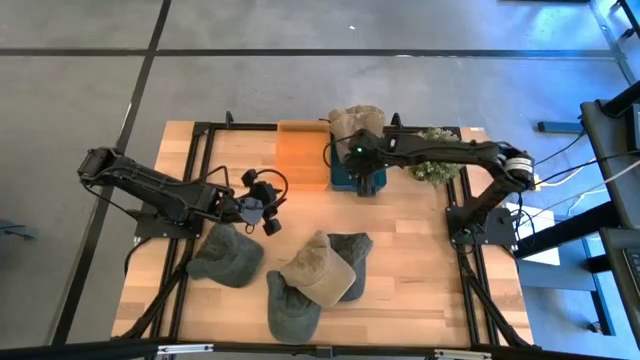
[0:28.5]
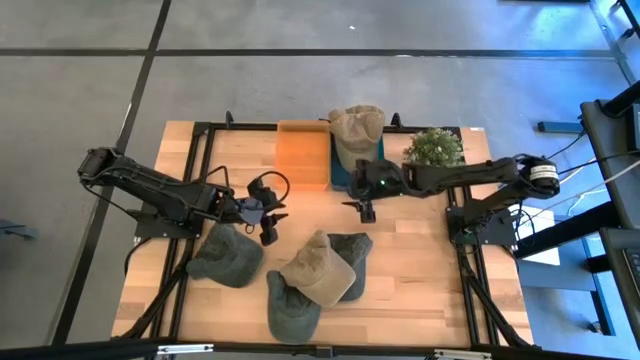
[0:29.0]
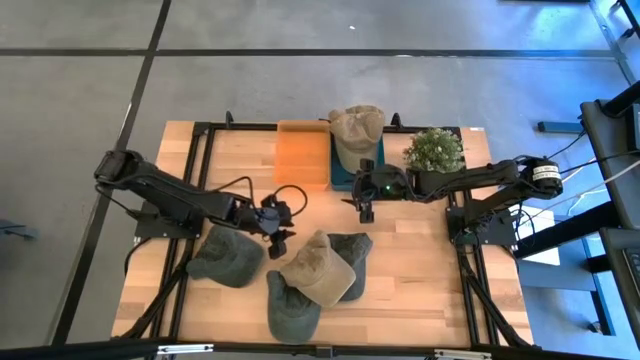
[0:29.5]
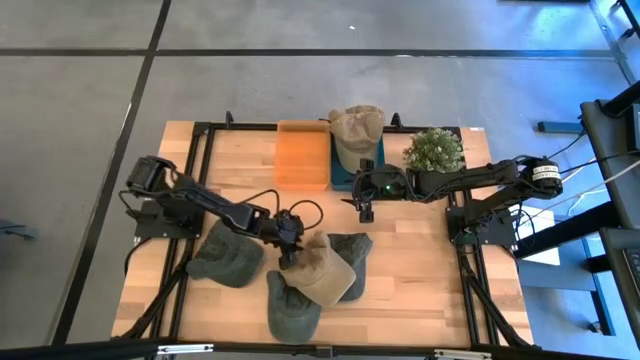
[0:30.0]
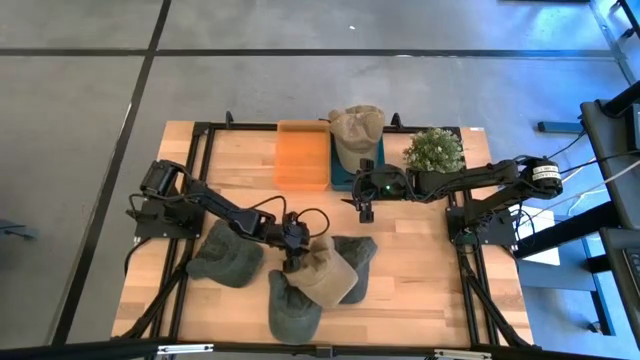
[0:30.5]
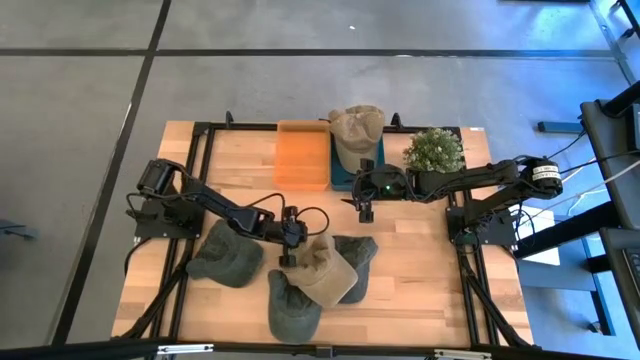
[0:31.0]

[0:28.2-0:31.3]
Task: Pick & Place hat
Put the brown cap into the right transparent bin

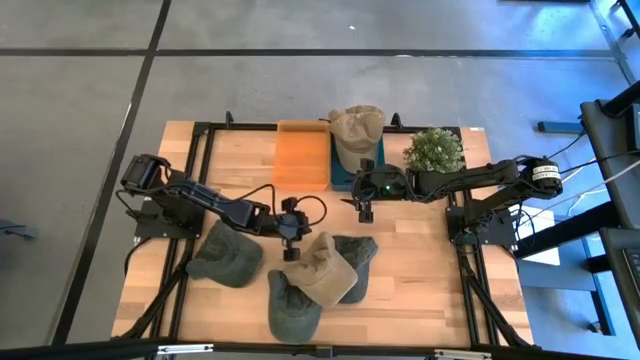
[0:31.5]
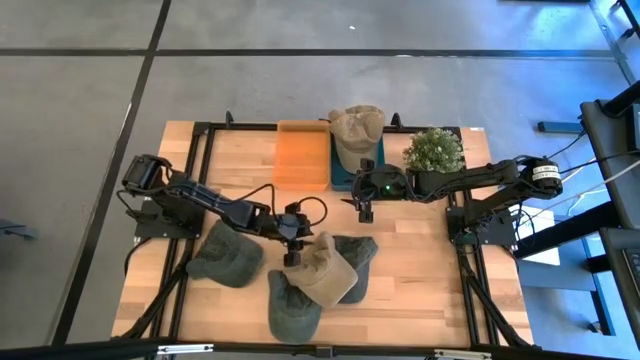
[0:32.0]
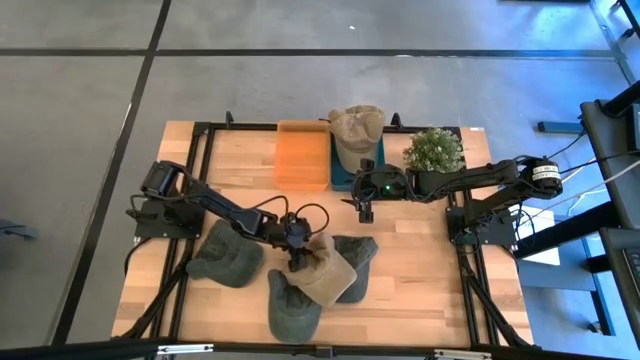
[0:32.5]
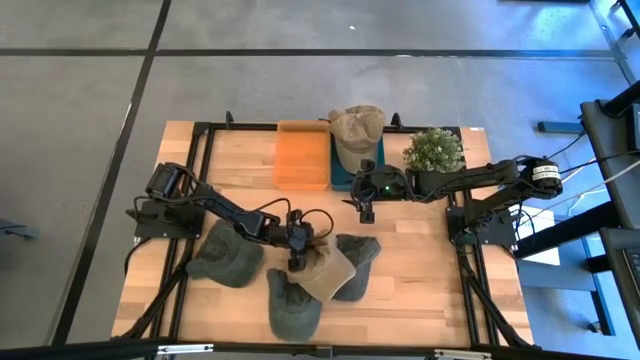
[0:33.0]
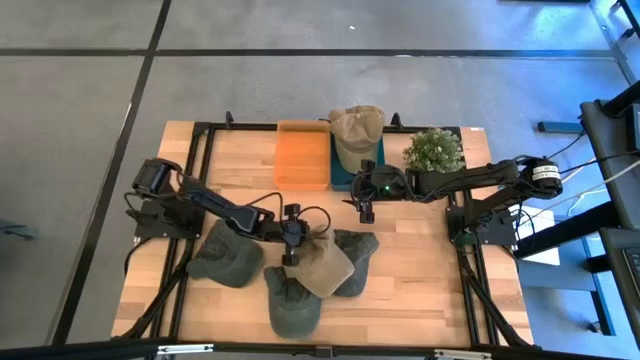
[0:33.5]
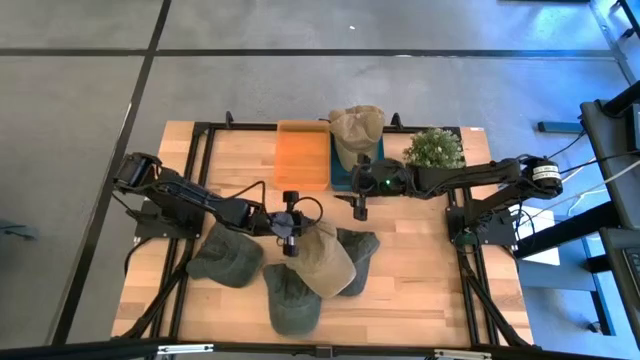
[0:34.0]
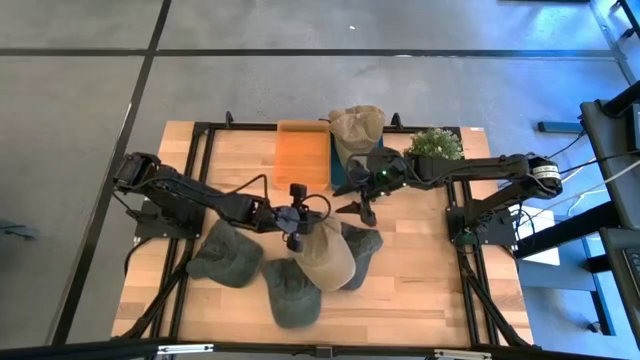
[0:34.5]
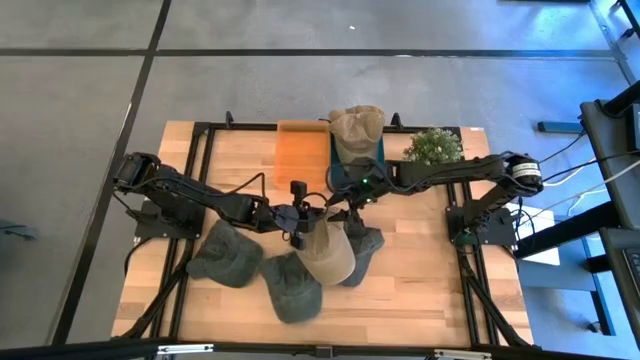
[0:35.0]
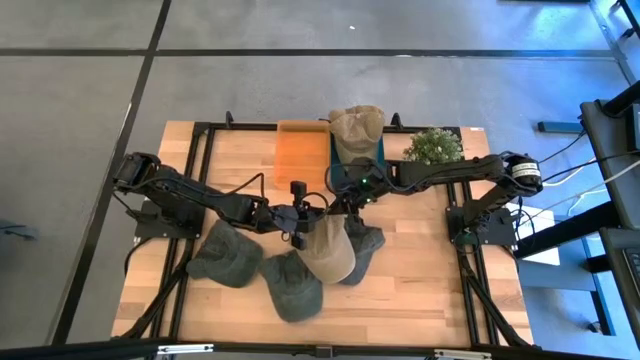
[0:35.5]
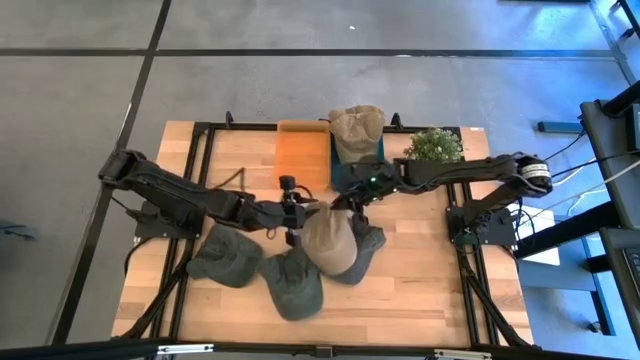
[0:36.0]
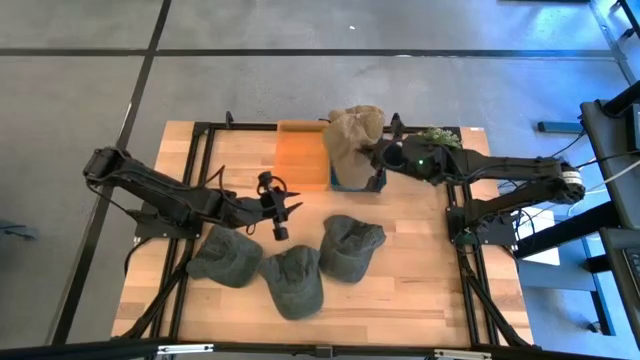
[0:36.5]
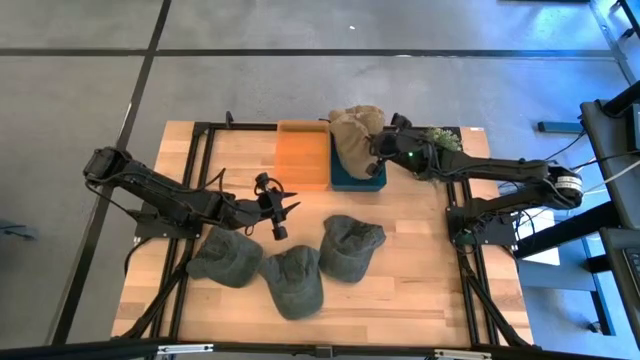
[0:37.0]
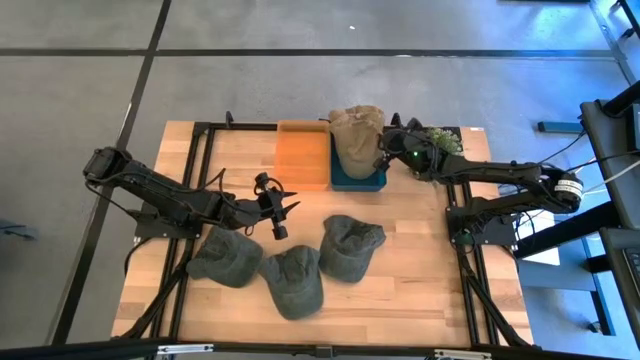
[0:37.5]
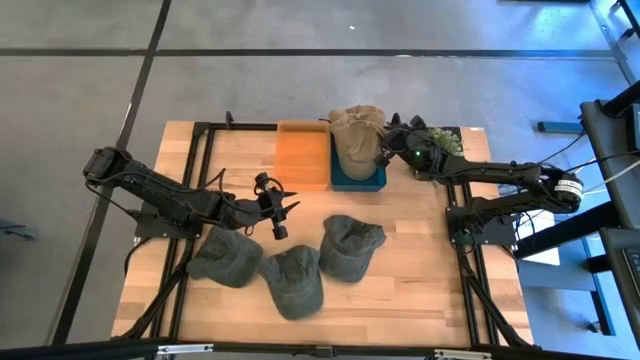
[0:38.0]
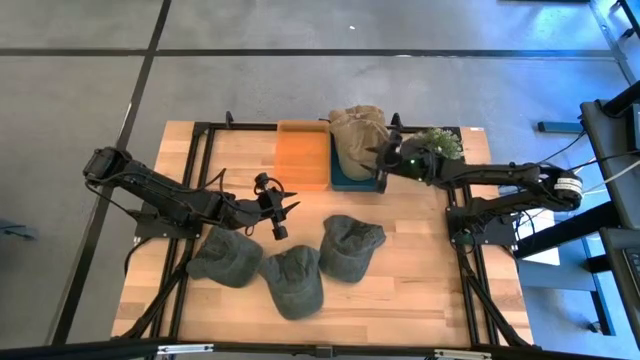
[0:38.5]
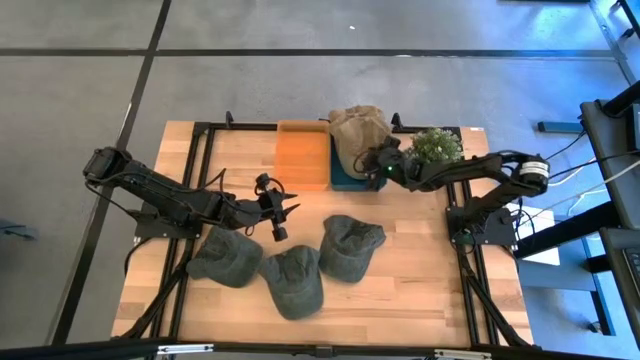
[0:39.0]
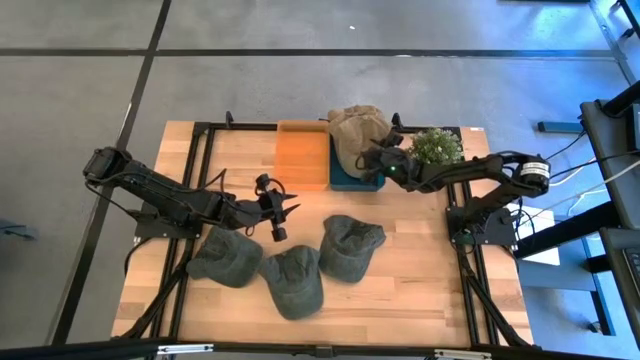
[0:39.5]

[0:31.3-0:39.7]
Put the brown cap into the right transparent bin

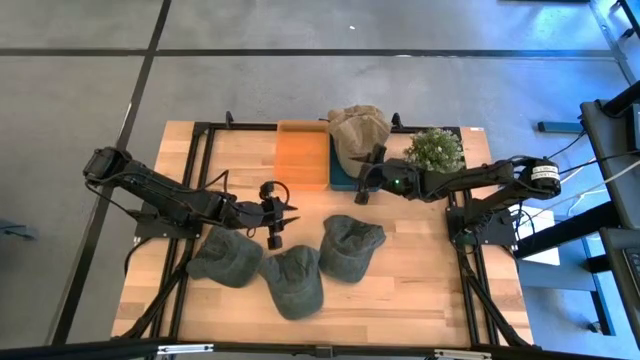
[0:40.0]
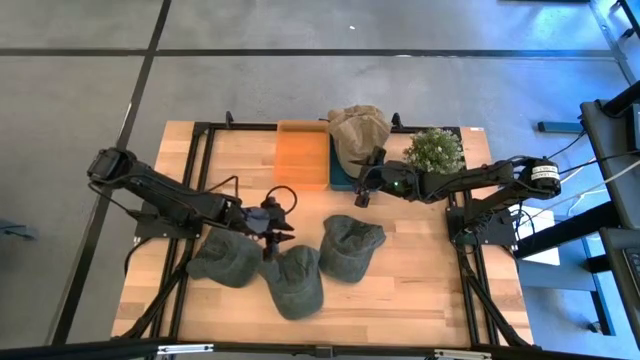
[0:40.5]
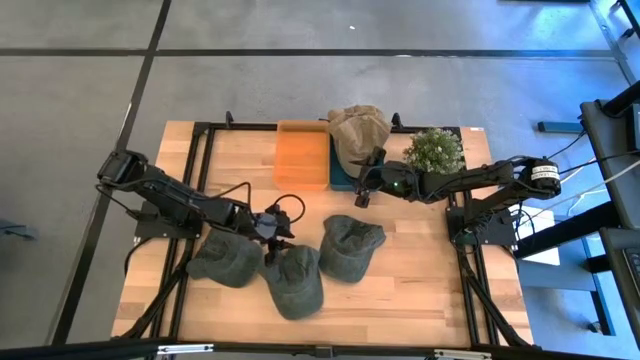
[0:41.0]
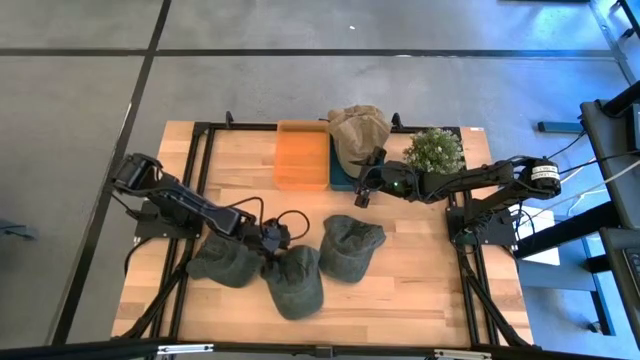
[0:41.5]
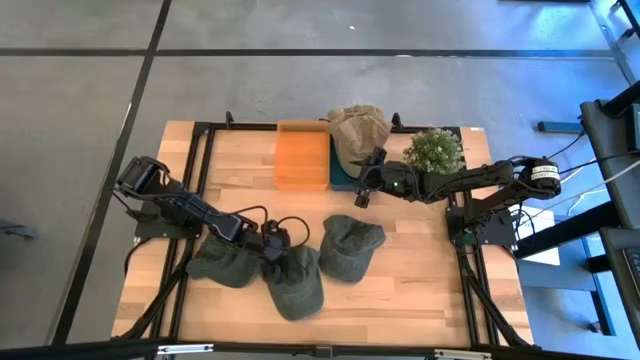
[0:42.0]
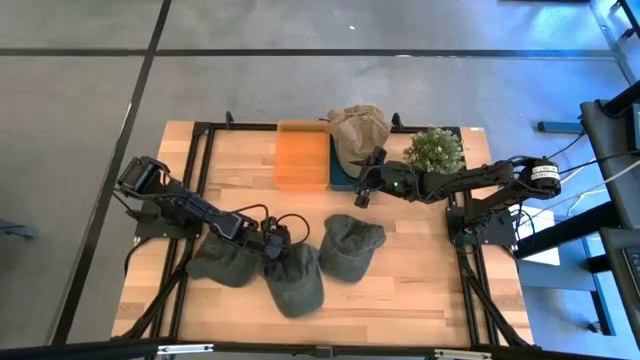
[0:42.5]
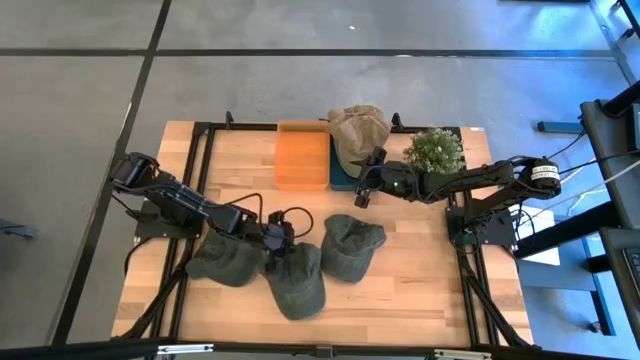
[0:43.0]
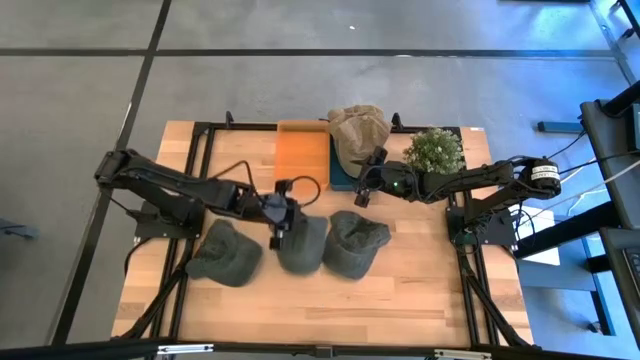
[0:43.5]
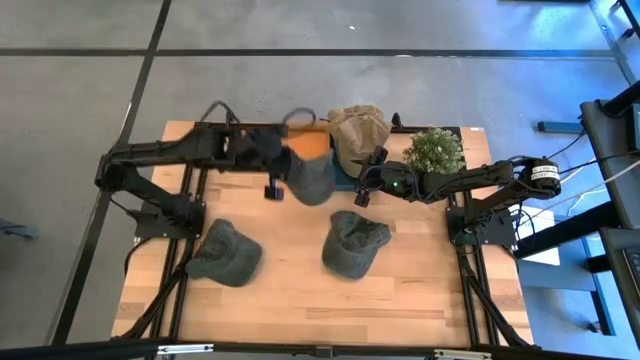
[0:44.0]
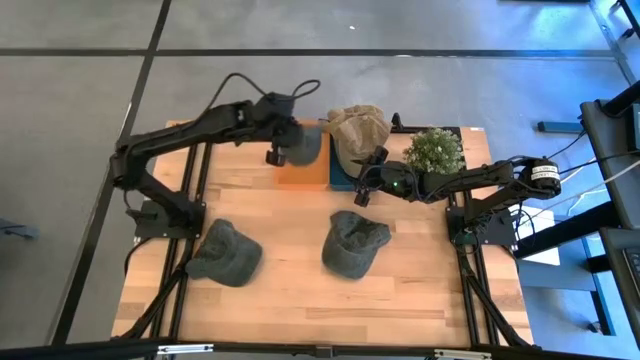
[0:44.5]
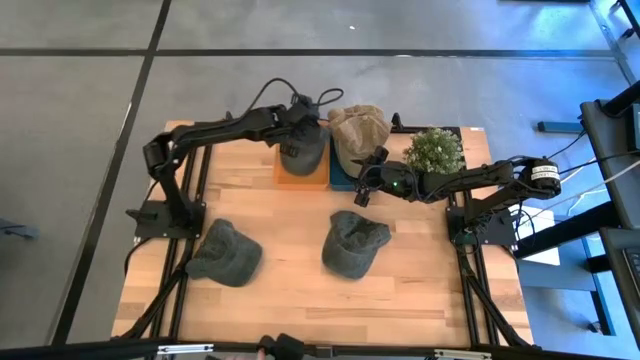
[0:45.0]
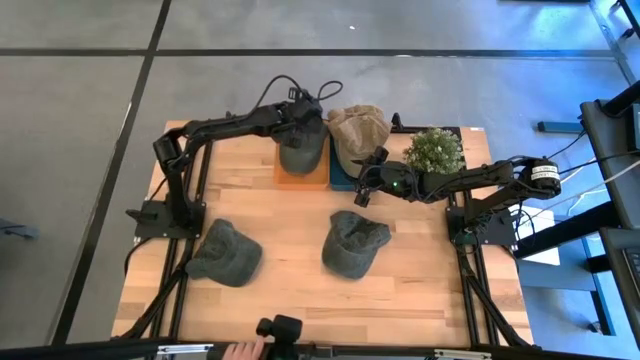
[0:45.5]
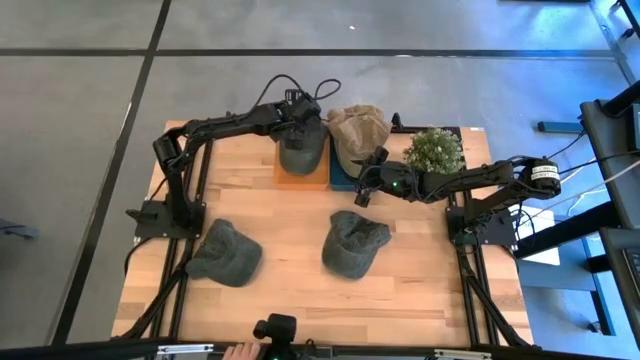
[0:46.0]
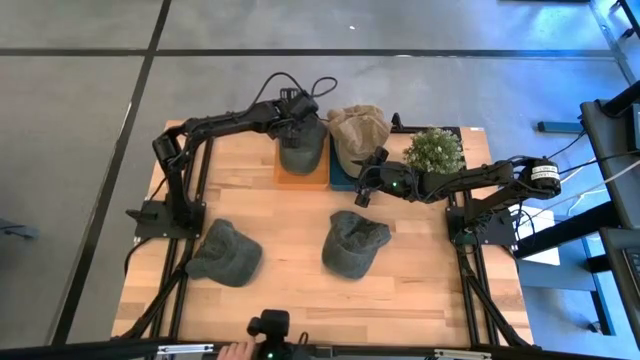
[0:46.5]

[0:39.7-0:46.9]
Put the middle black cap into the left transparent bin

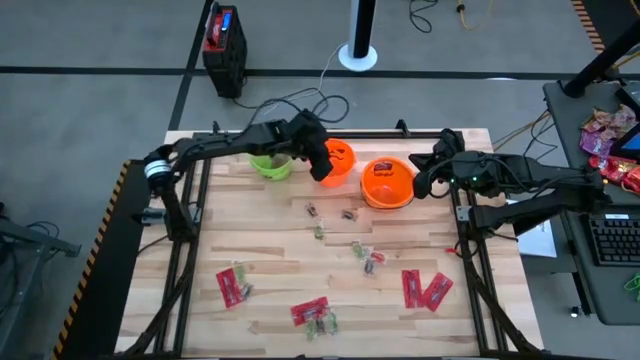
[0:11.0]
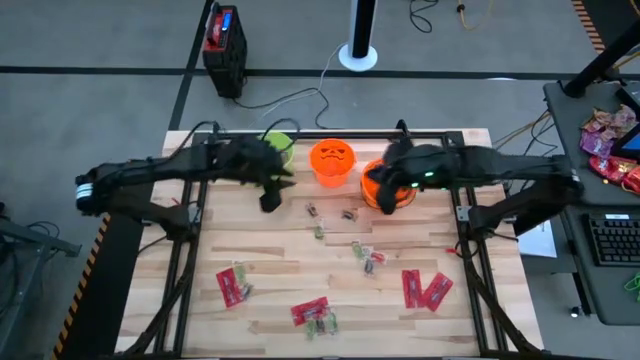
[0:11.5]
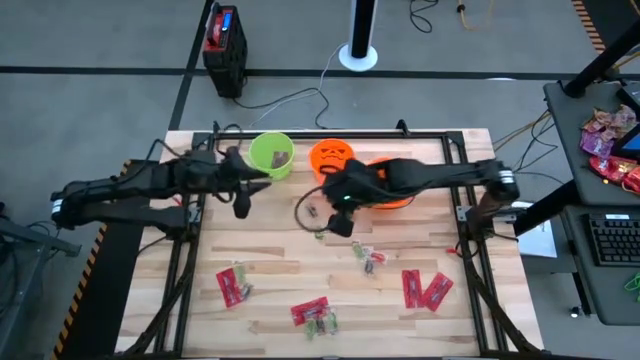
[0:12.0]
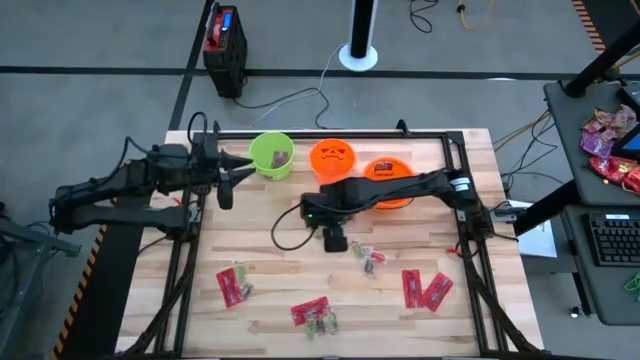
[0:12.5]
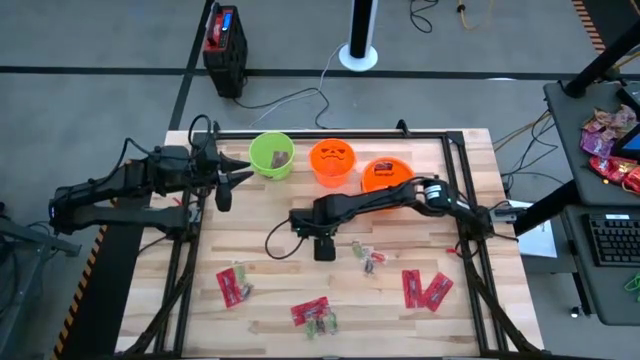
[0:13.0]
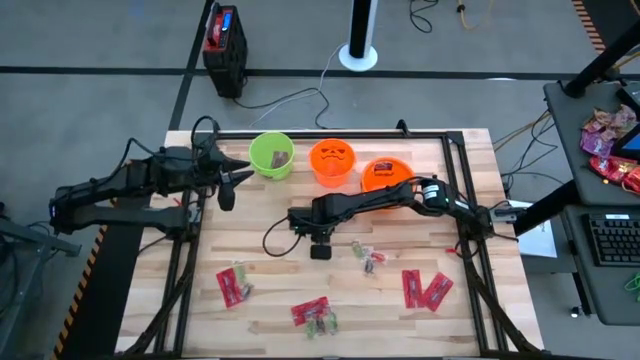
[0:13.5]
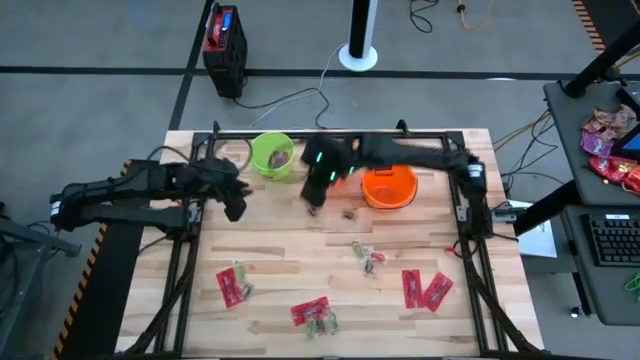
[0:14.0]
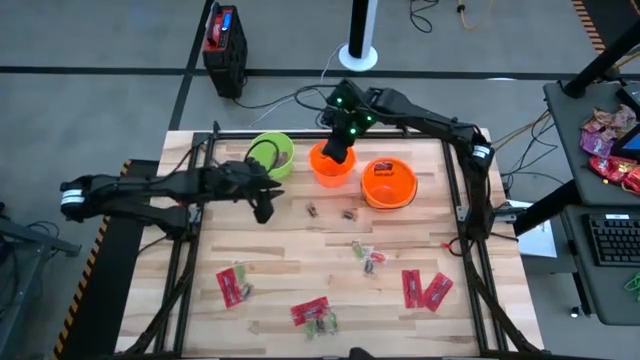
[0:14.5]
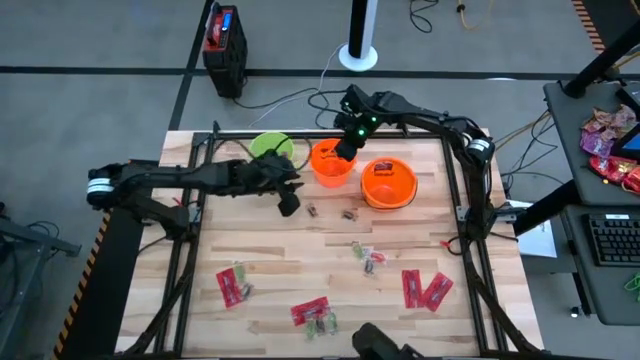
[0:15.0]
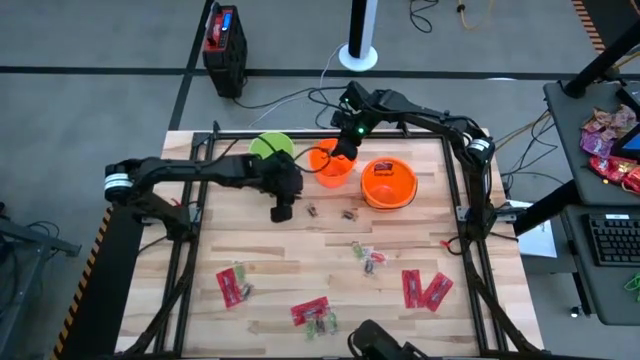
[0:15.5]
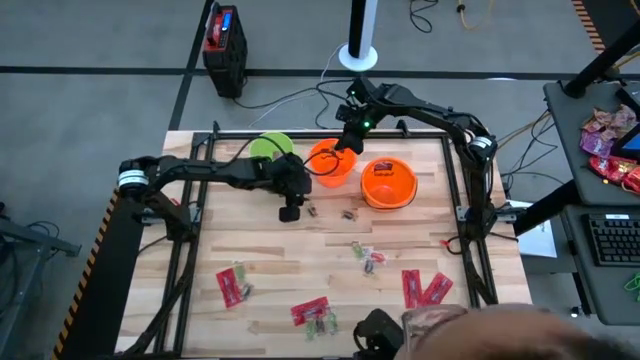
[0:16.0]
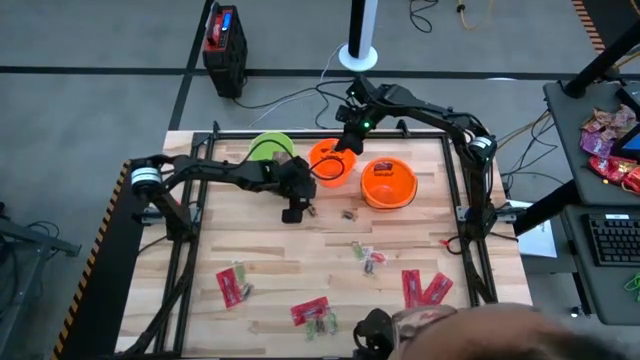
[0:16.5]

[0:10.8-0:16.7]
Task: Sort candy by brand, put in halloween buckets
Put the green gummy into the left orange bucket
